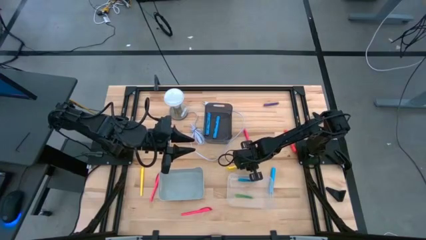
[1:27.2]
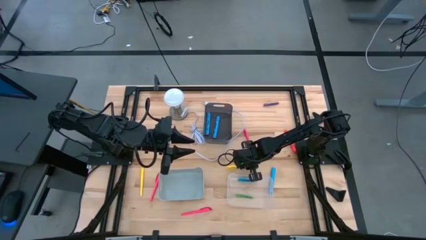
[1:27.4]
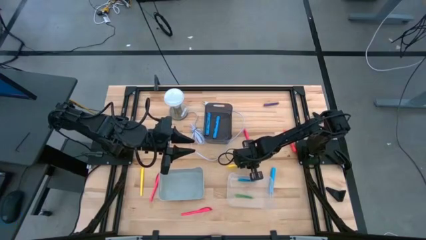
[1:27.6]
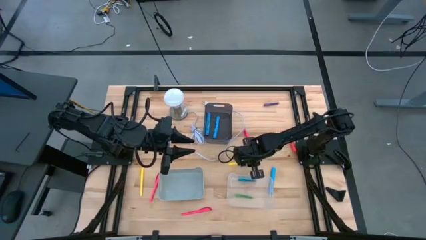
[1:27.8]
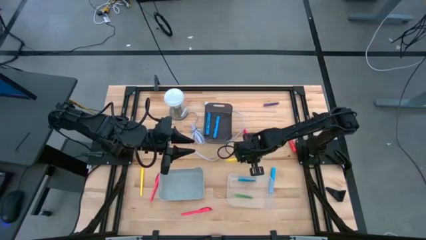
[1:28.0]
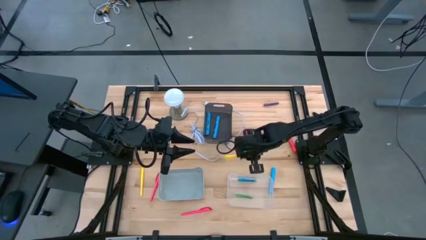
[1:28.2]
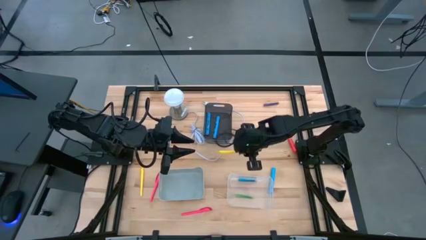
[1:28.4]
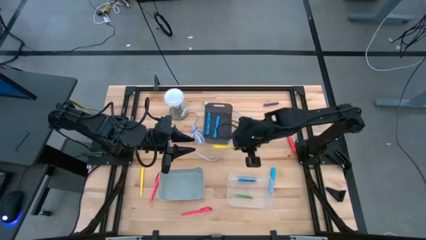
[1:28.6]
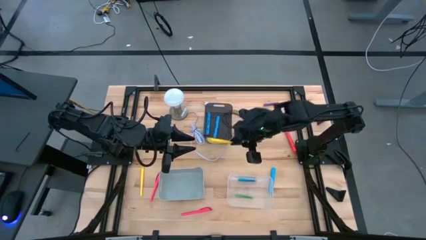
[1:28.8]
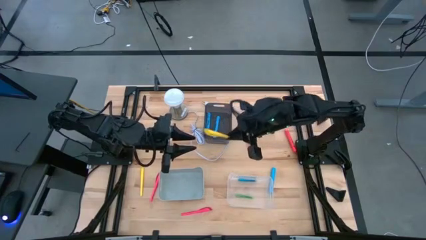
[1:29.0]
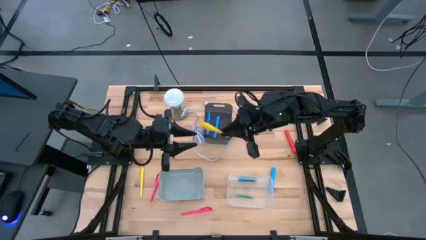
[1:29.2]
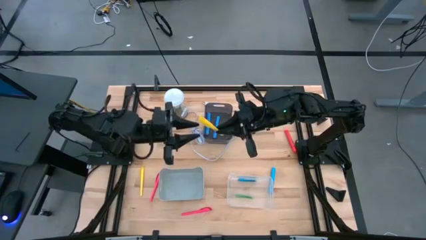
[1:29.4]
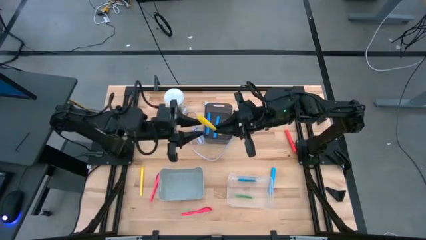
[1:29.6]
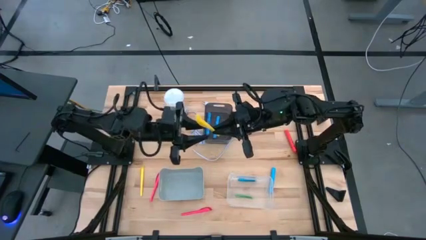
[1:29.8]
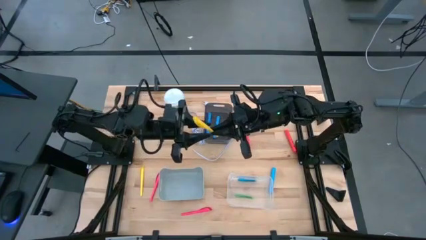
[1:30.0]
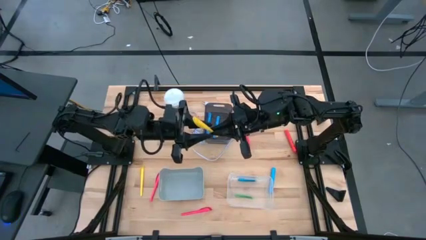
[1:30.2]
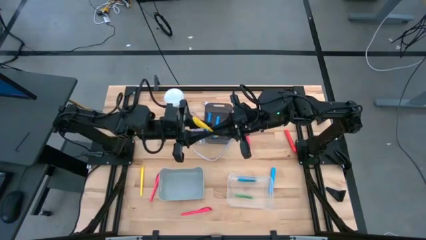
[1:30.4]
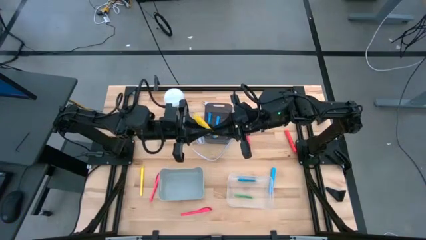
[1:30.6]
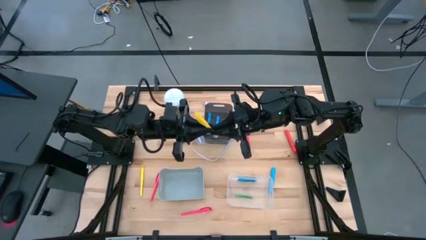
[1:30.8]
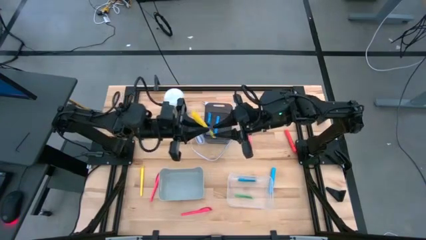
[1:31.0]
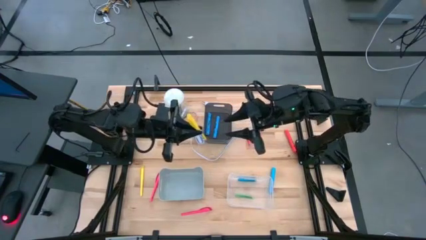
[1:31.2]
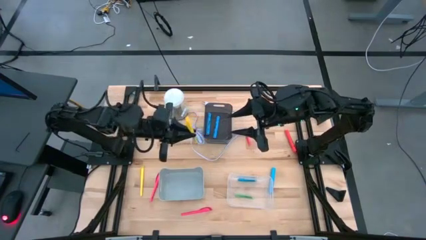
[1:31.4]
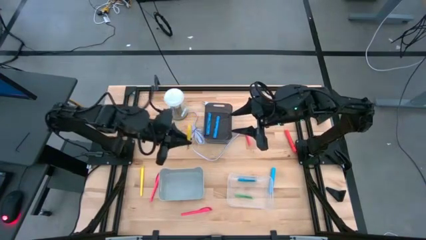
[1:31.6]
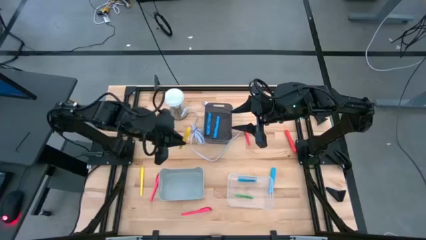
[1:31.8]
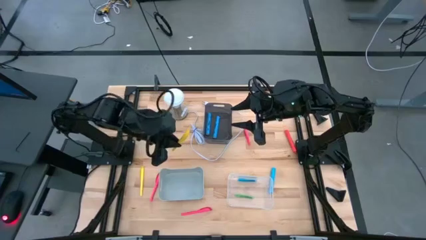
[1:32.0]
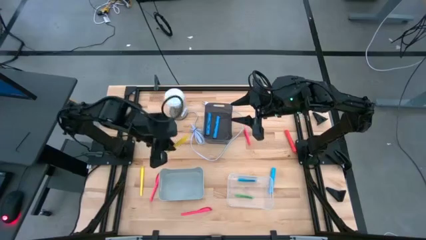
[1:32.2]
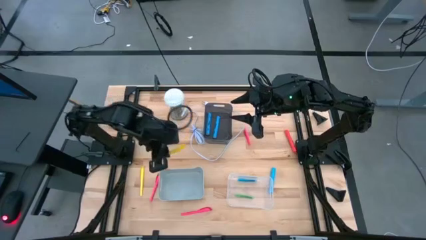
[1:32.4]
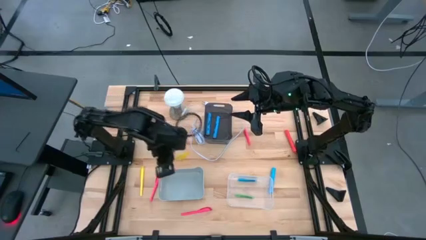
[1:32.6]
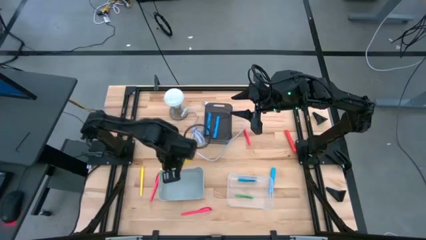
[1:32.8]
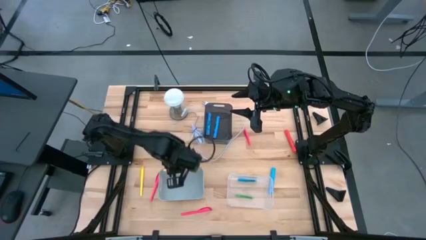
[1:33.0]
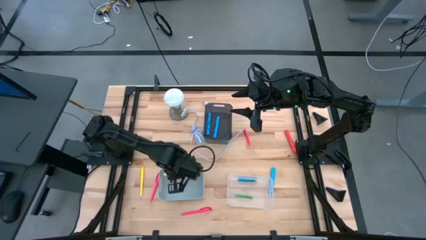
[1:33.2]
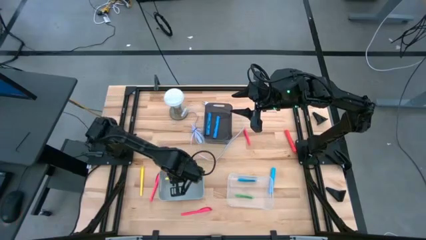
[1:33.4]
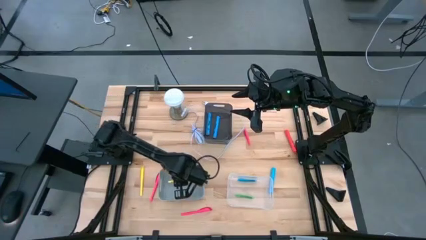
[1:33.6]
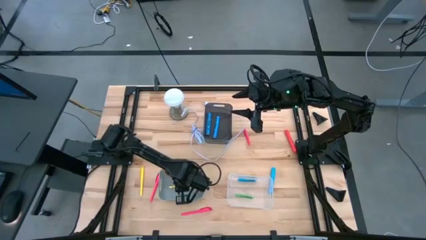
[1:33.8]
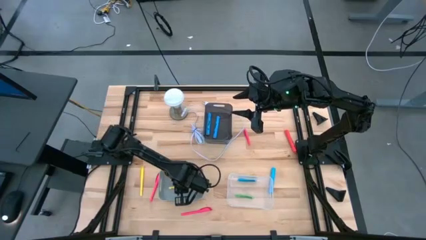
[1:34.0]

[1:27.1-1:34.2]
Task: Pick & Place Markers
Put the top yellow highlighter pen into the gray bin

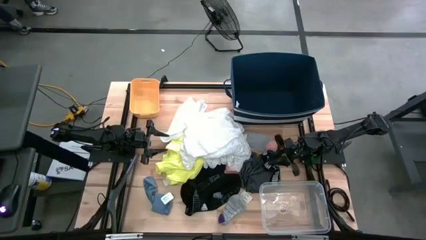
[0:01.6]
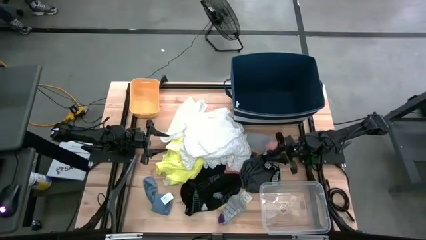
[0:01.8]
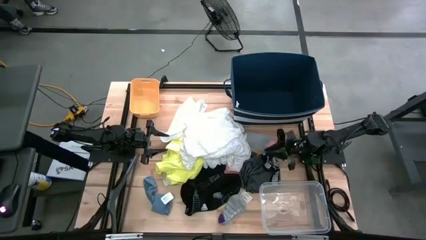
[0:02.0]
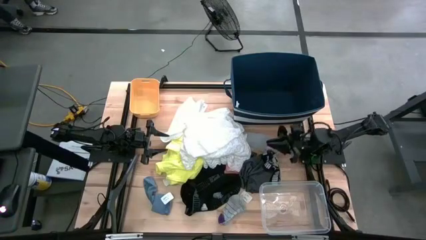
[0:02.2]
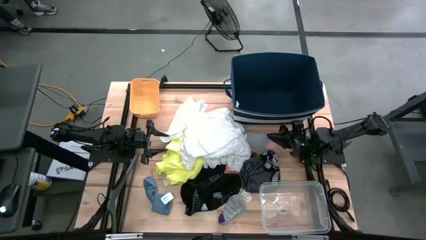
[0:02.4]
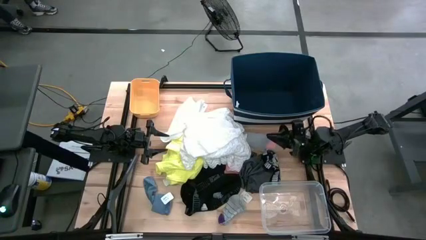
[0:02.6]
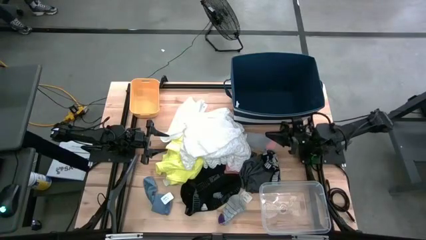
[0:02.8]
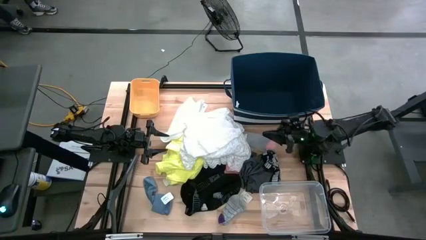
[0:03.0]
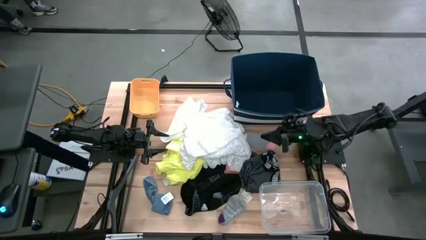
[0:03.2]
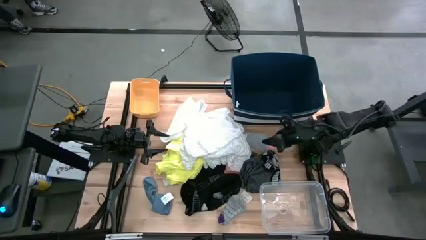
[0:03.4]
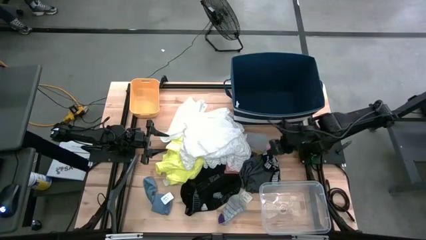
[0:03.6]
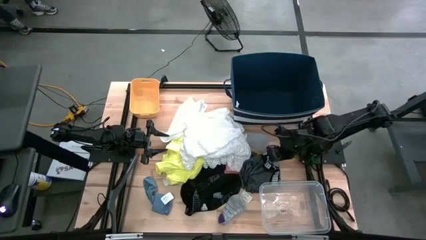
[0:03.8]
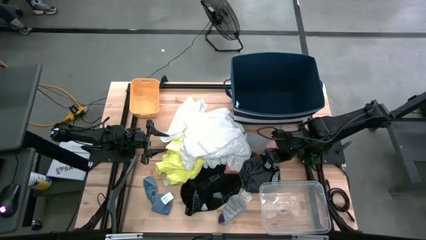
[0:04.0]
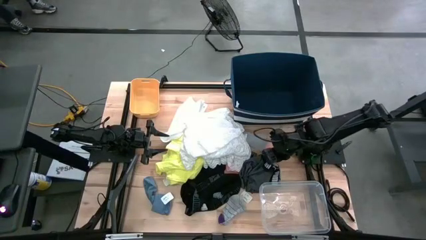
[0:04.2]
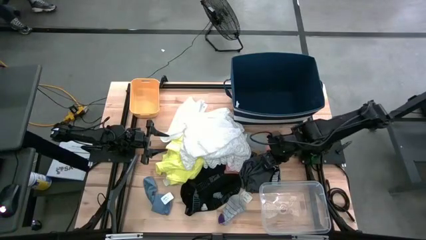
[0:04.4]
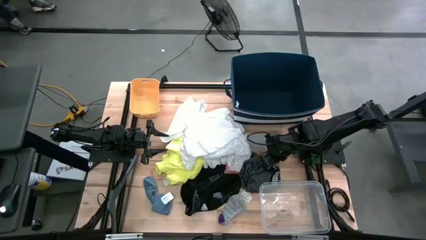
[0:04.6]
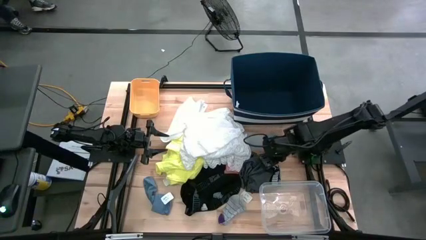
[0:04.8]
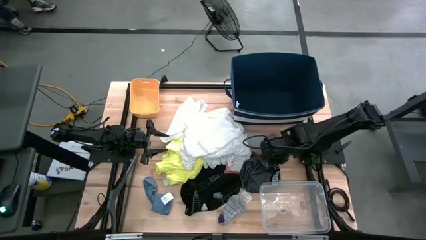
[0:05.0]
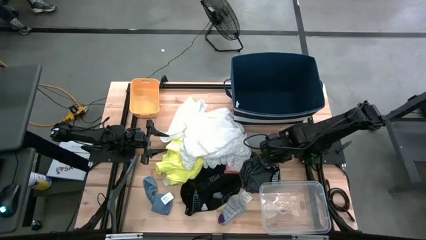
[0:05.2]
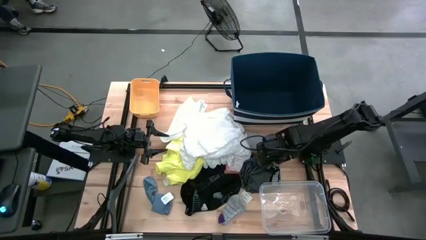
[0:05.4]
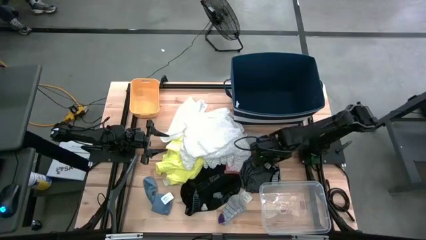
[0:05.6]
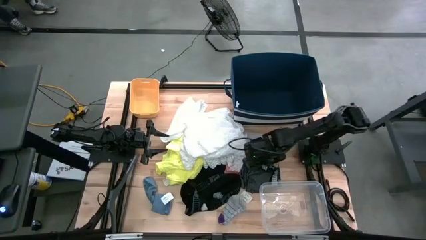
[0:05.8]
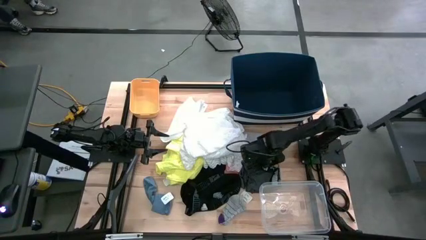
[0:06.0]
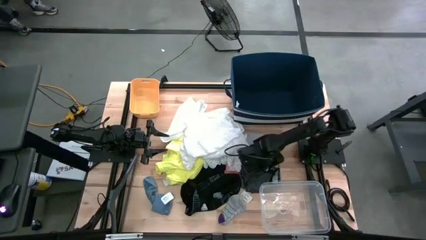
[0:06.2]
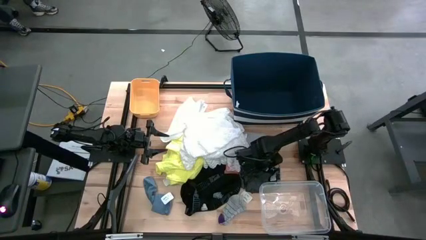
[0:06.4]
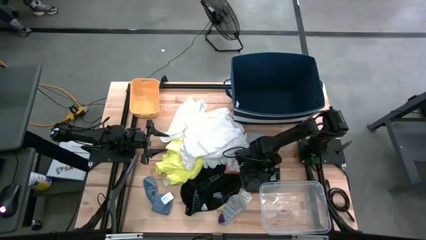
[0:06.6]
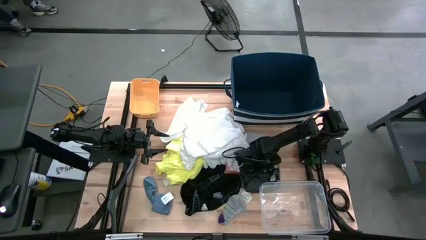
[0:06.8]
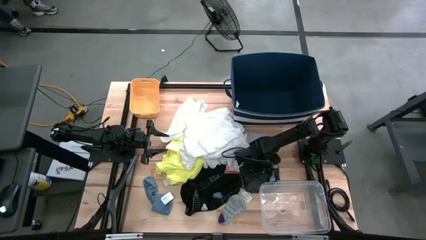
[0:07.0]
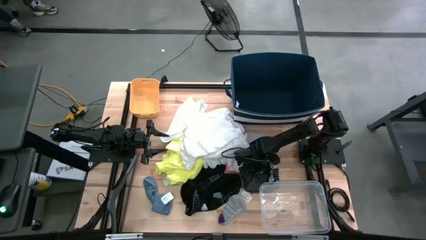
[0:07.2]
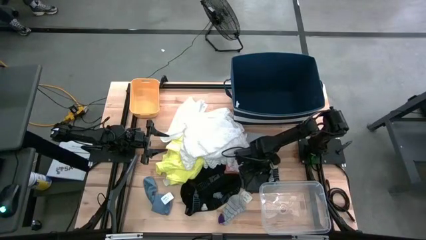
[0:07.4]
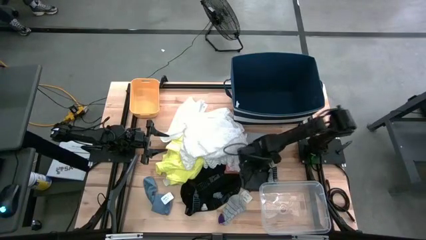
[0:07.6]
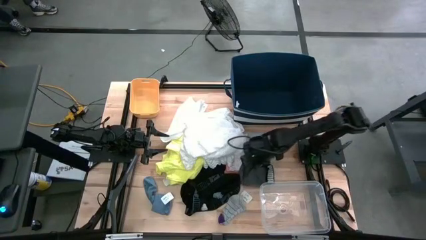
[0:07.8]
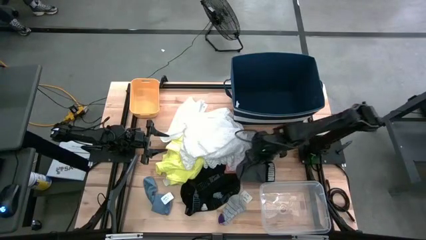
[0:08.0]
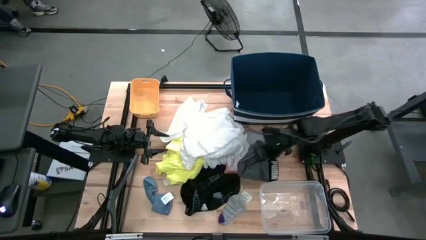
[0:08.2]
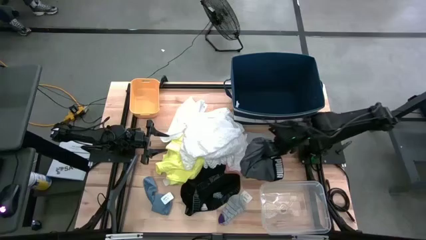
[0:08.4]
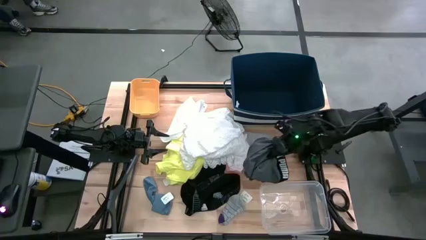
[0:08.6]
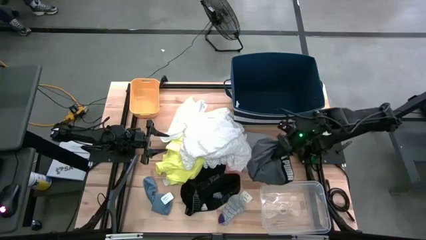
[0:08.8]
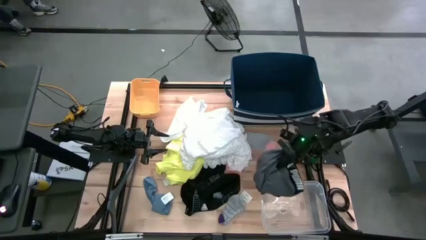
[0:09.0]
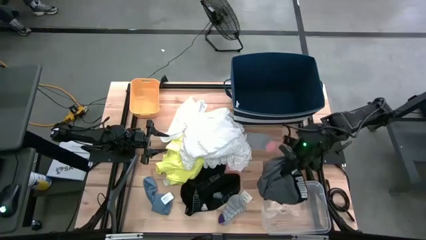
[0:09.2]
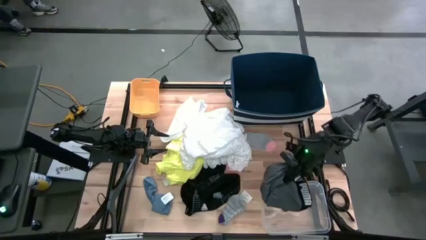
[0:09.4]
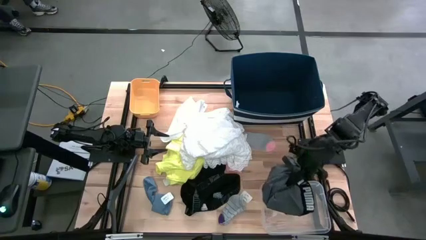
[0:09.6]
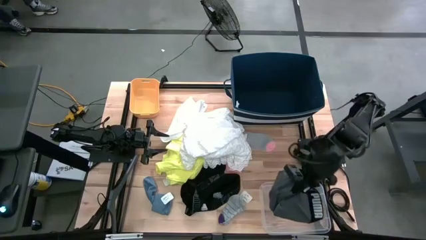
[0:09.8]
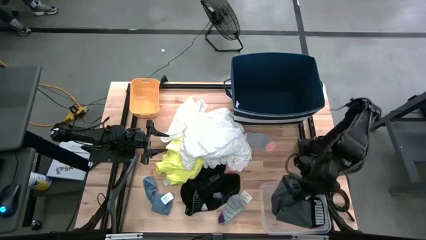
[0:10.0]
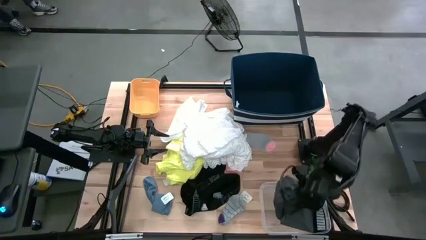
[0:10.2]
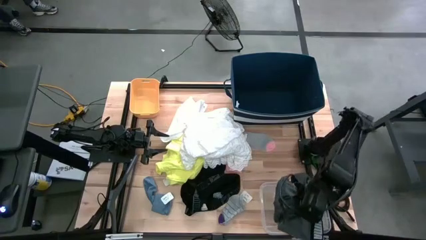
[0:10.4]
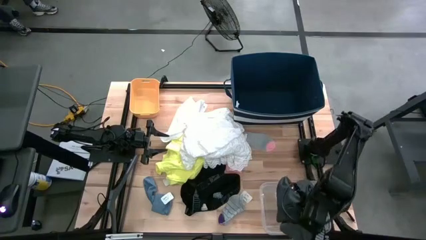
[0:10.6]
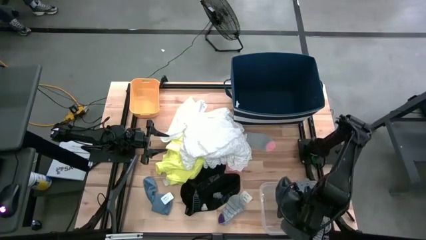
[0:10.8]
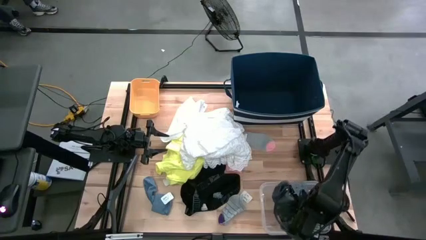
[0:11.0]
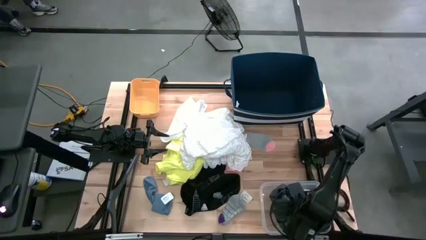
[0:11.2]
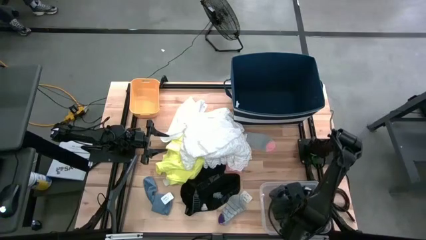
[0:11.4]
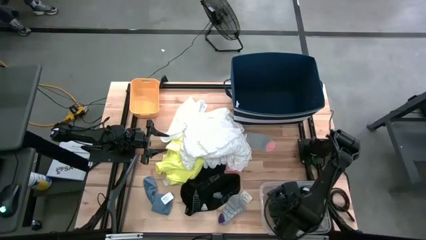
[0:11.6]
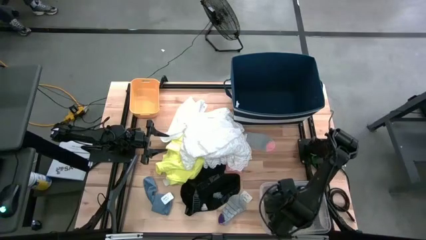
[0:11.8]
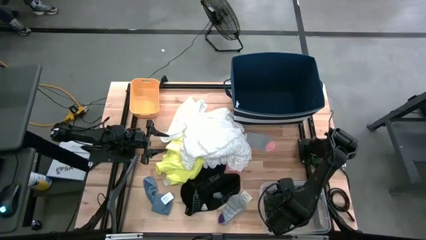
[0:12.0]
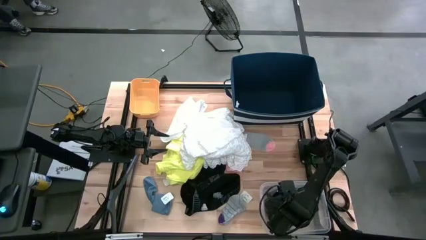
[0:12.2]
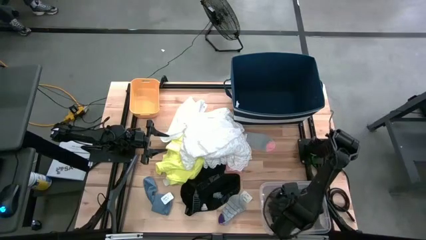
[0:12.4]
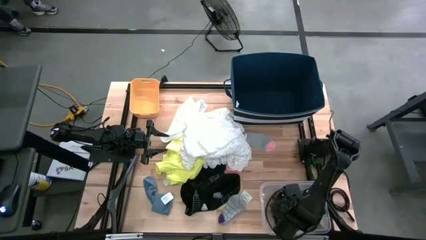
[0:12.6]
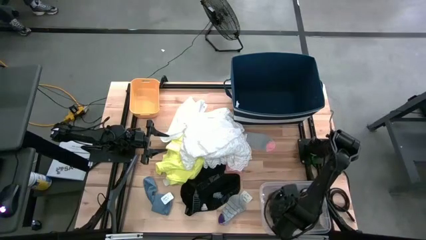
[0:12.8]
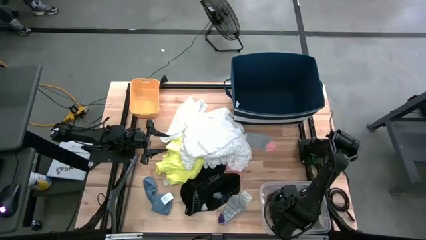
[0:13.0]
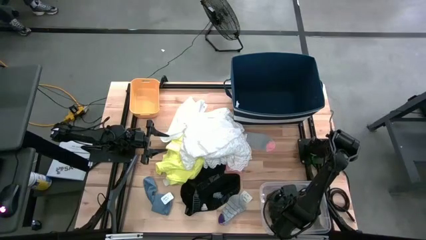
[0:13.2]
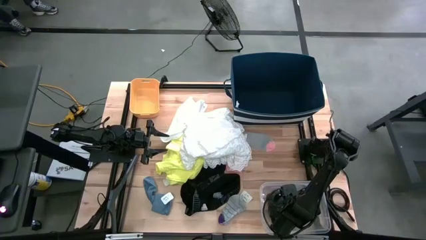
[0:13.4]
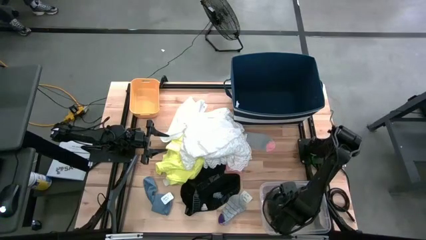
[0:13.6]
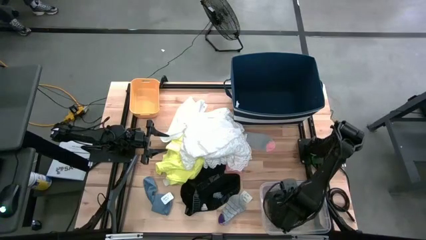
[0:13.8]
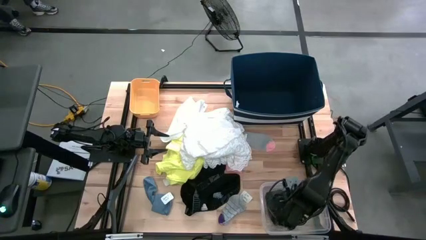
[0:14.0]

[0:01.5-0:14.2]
Task: Pick & Place Cloths
Put the gray boxers into the transparent bin
